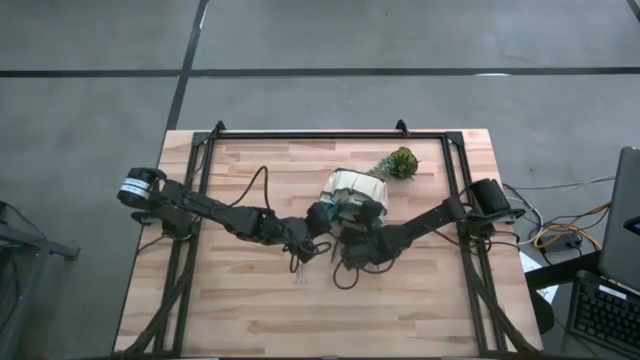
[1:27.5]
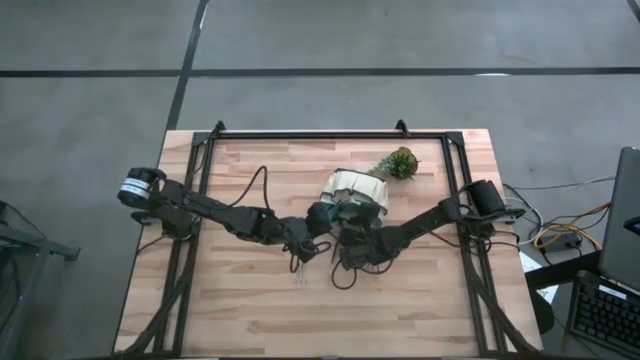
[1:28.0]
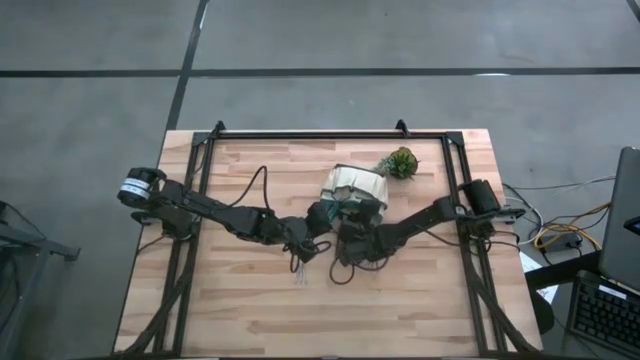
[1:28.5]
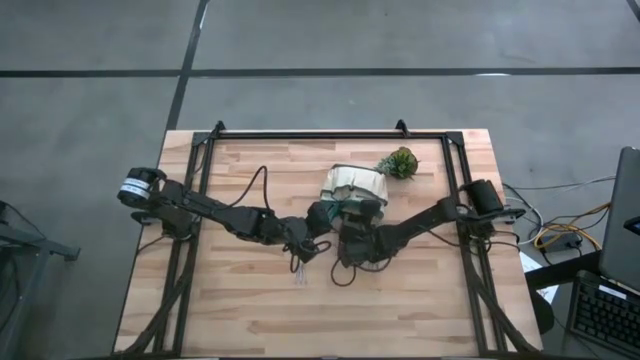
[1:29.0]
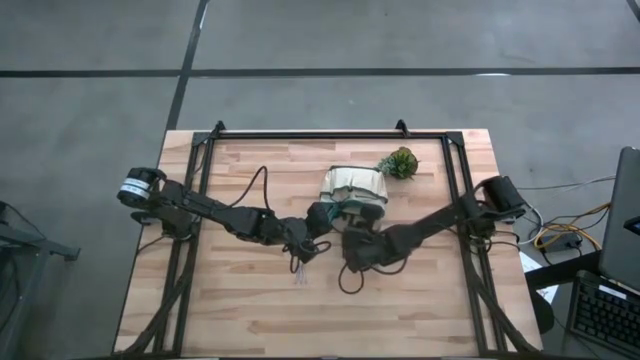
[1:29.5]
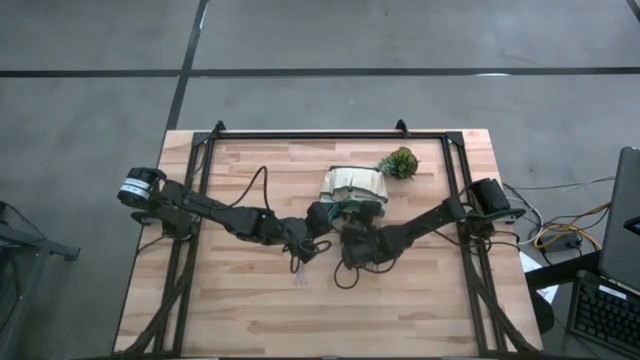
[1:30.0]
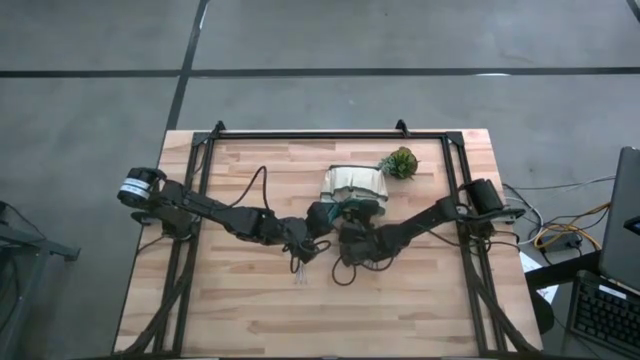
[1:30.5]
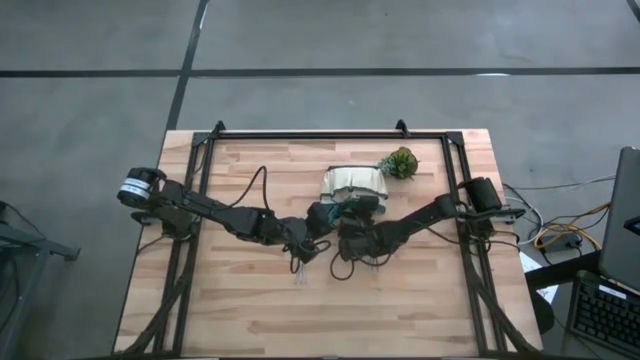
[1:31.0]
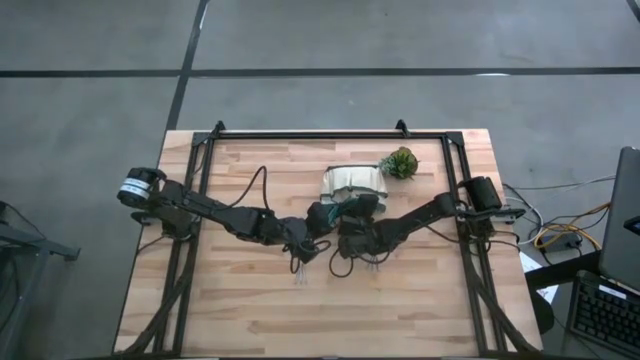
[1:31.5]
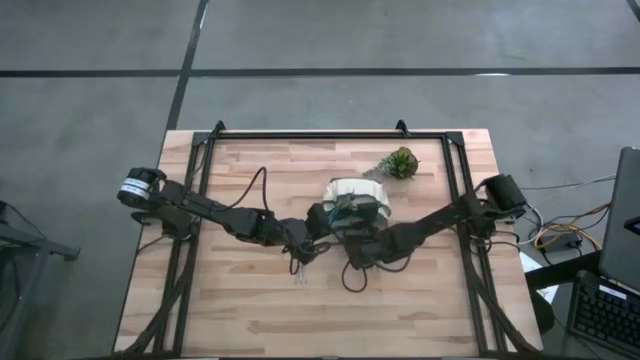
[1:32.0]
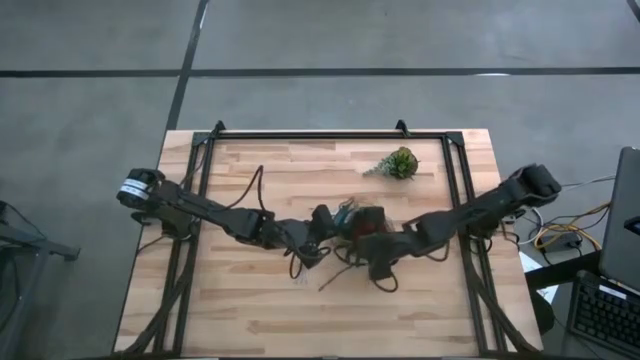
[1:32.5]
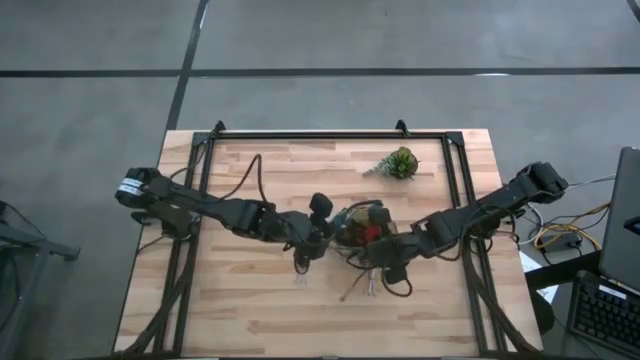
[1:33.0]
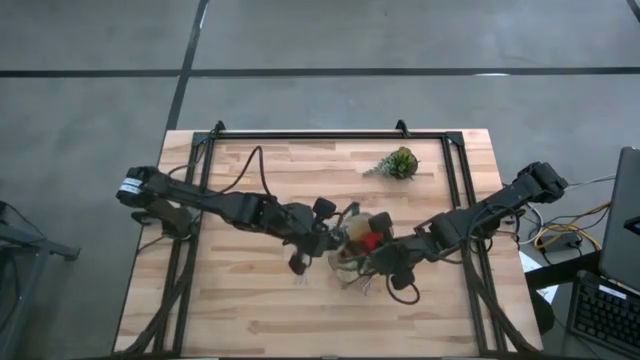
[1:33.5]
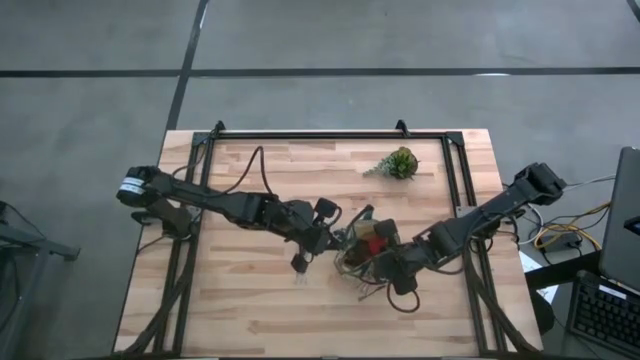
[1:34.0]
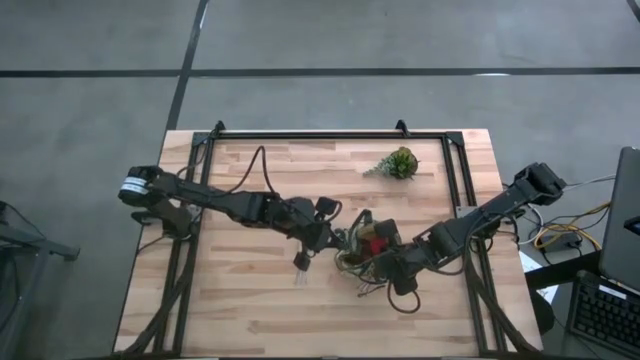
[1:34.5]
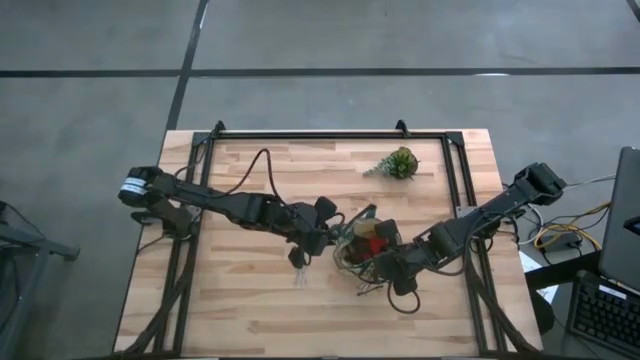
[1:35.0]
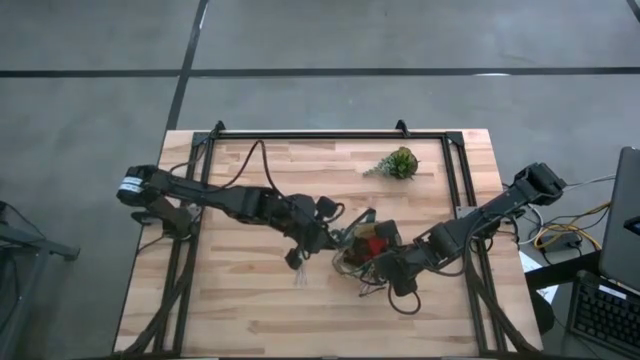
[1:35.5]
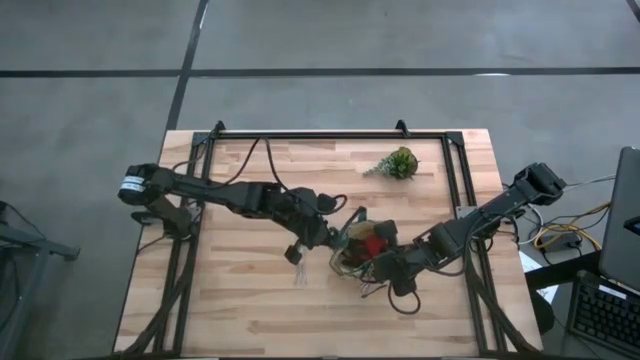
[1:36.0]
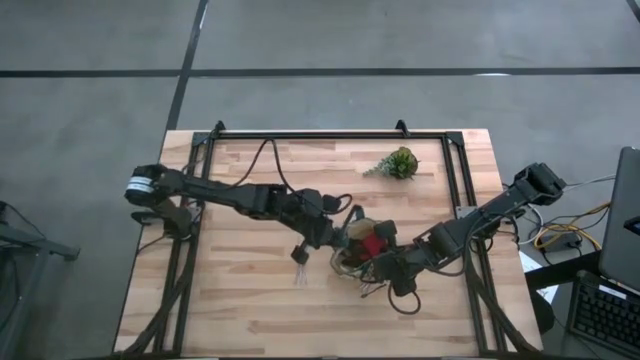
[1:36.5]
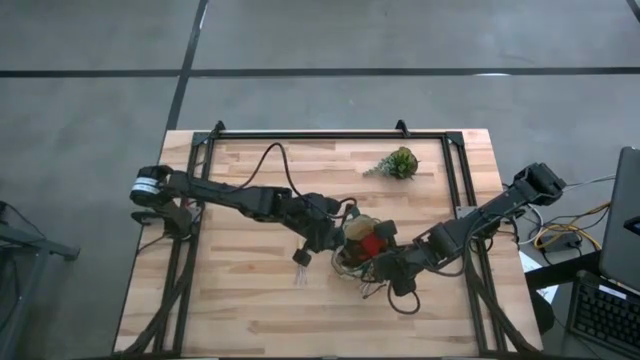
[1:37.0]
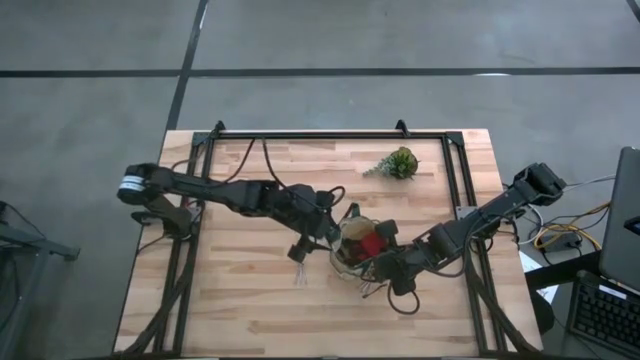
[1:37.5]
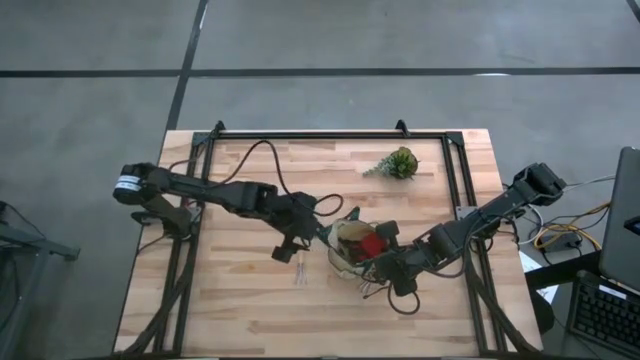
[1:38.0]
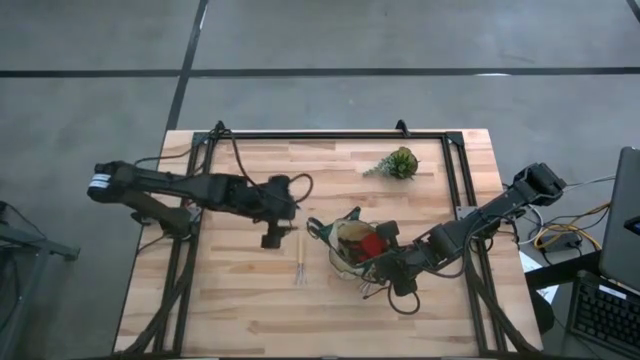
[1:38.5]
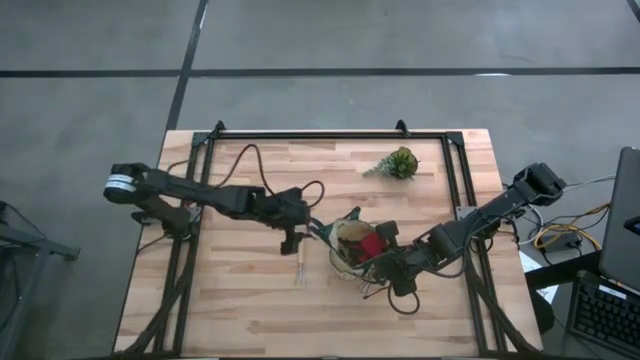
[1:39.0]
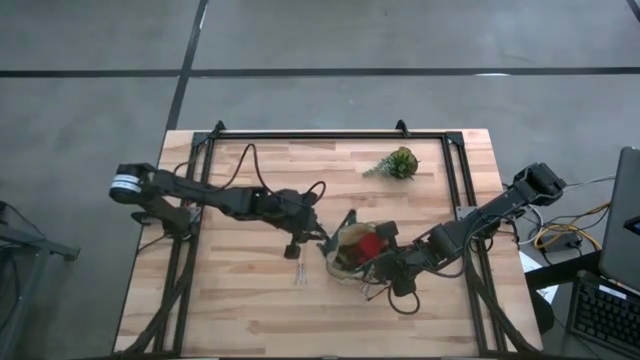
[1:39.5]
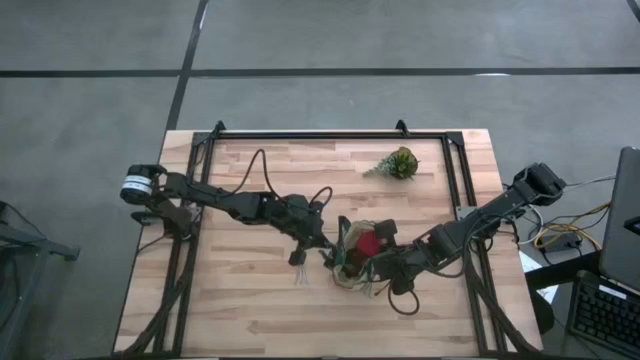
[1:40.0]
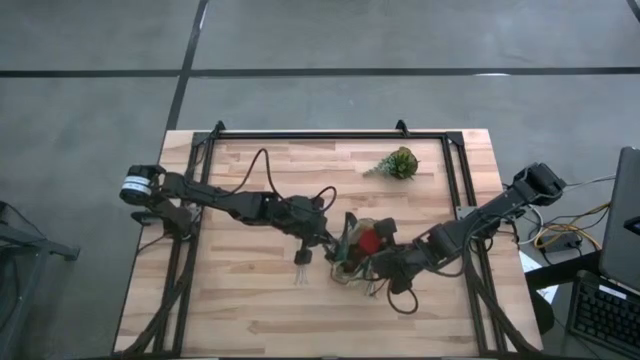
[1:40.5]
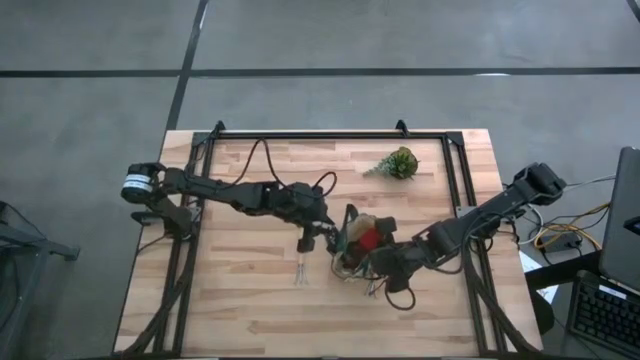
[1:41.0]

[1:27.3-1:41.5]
Task: Pick & Place Garden tools in Gardening bag
Put the shear scissors into the gardening bag

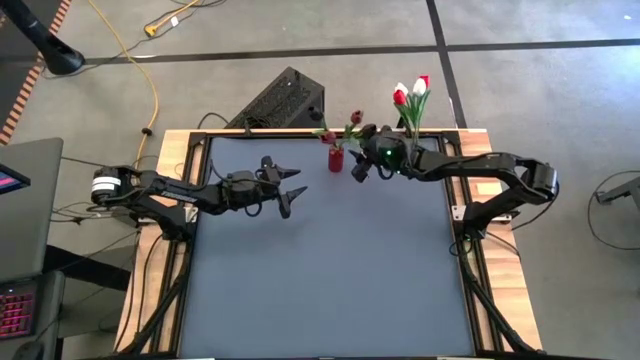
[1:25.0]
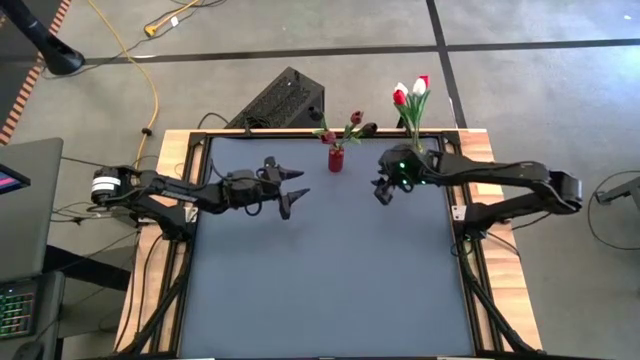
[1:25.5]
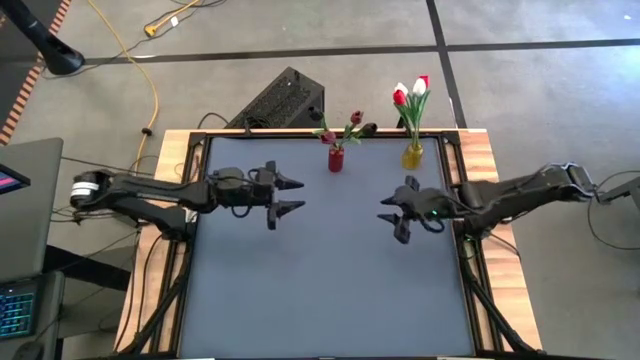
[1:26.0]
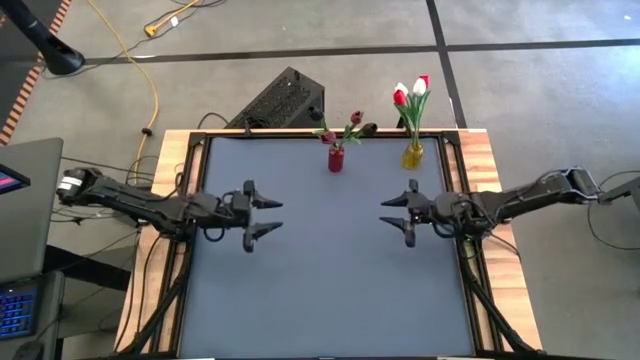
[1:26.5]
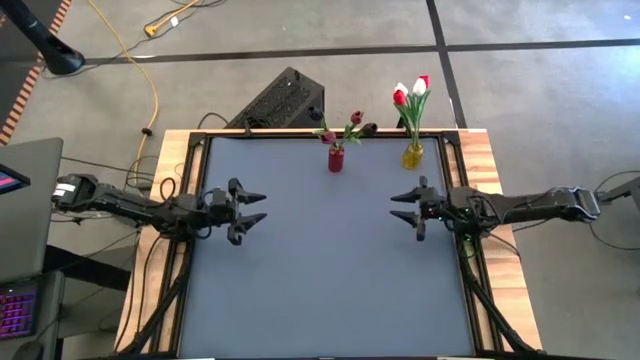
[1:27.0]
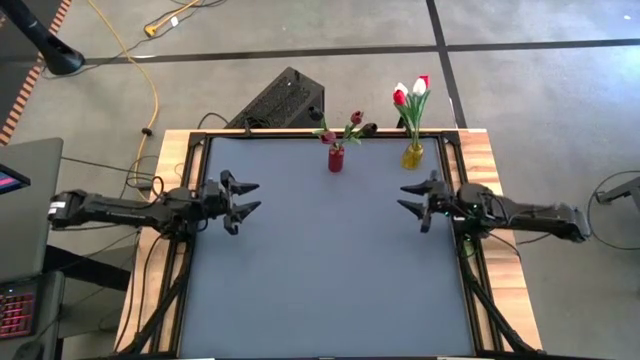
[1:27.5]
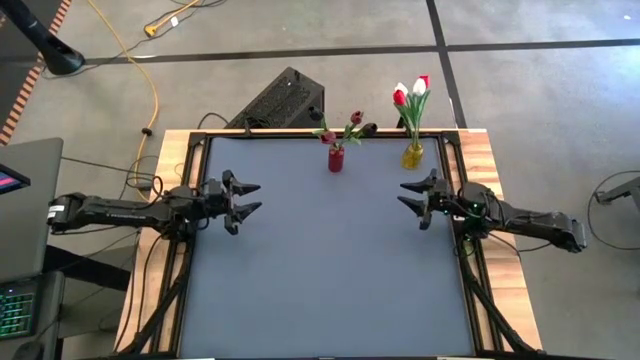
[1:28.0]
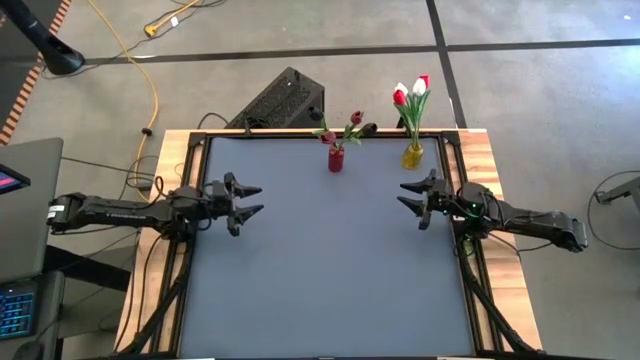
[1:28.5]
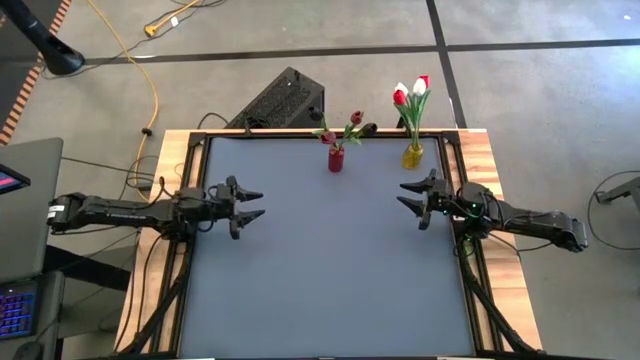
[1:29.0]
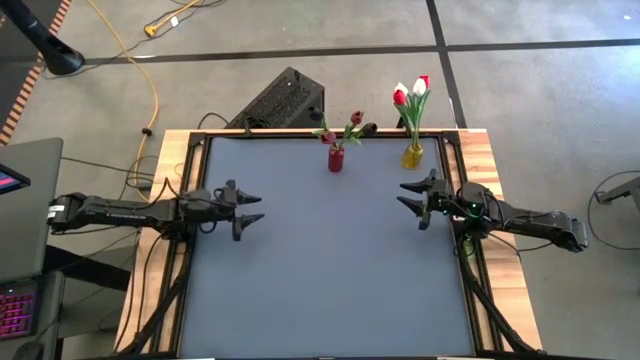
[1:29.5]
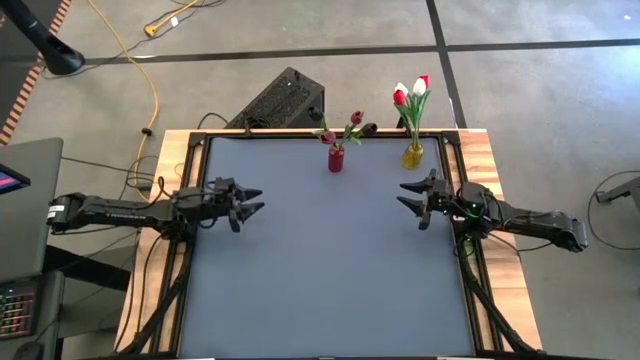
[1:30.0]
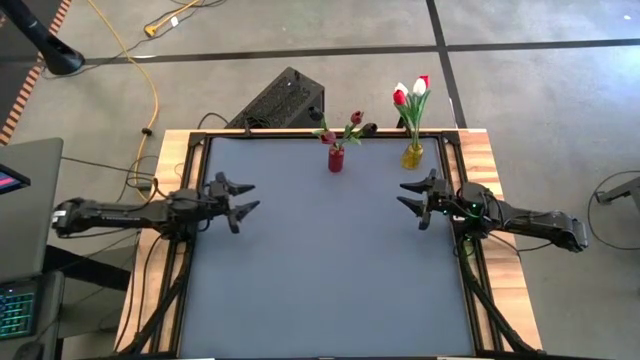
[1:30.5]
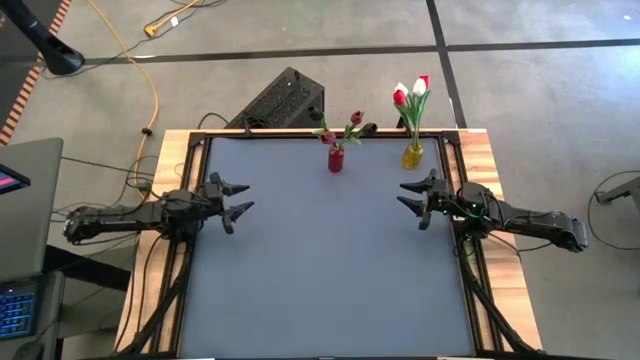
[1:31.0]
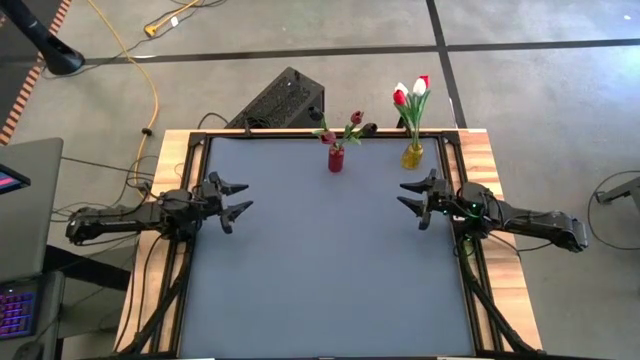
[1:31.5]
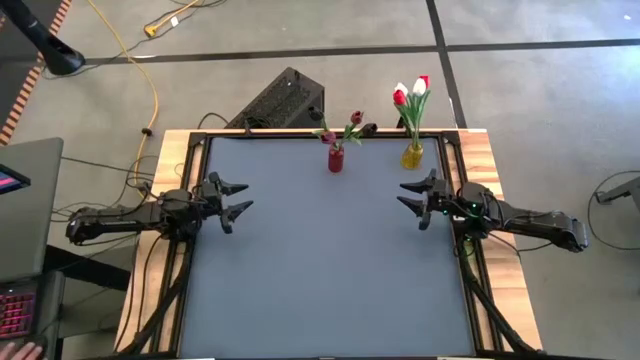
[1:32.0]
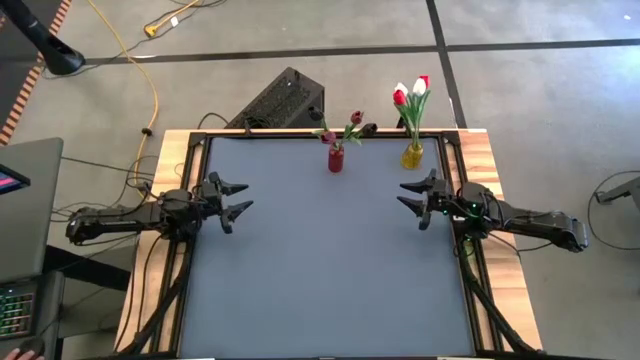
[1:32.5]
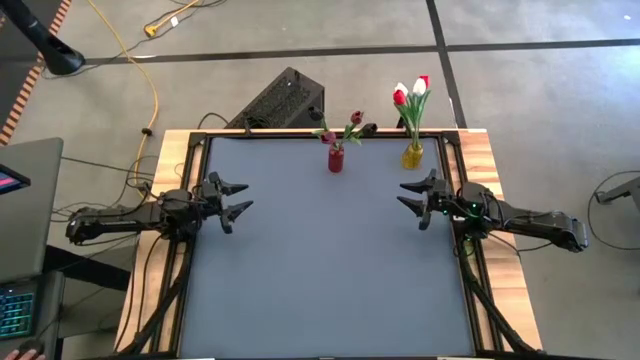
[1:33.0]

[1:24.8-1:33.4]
Task: Sort flowers into vase by color
Return to Home Position
